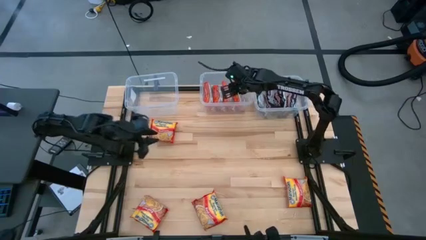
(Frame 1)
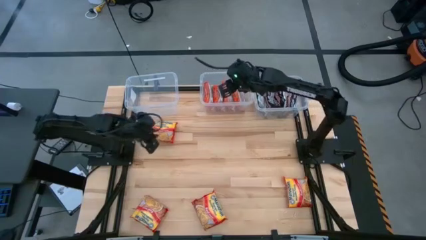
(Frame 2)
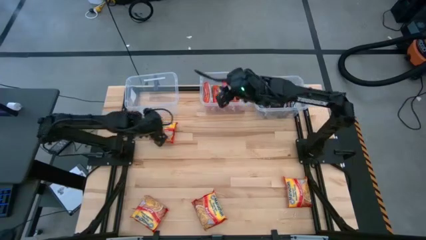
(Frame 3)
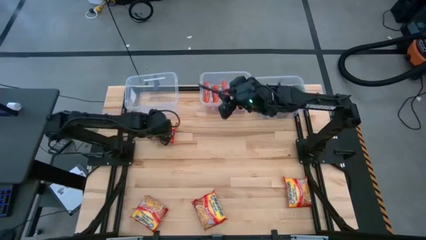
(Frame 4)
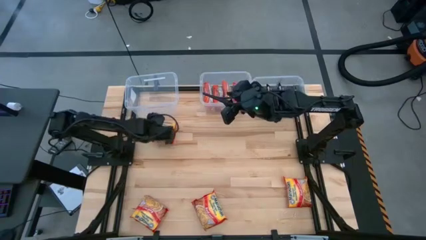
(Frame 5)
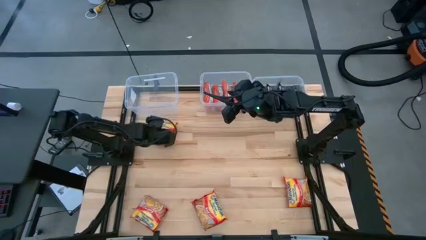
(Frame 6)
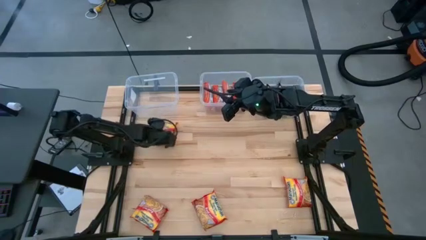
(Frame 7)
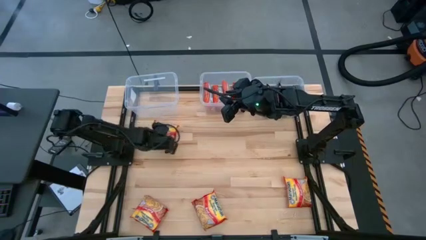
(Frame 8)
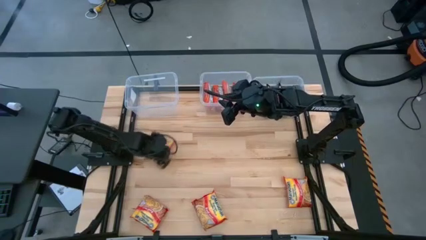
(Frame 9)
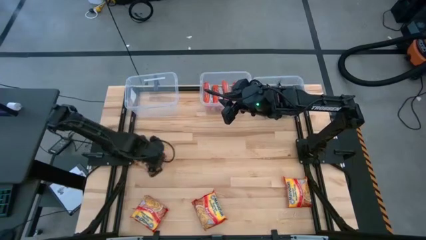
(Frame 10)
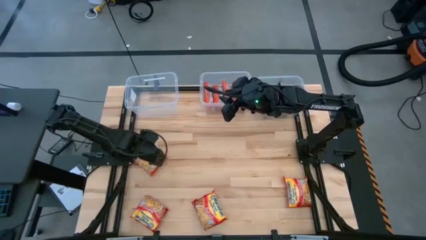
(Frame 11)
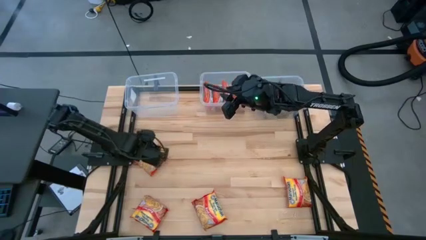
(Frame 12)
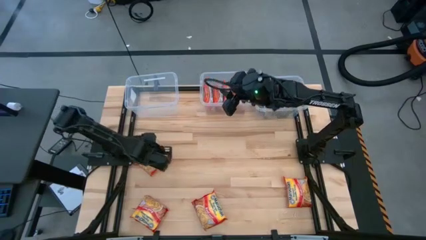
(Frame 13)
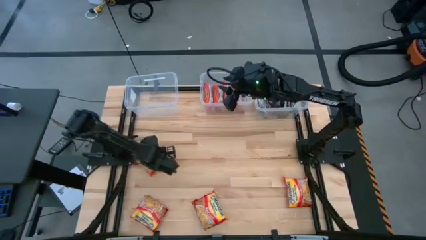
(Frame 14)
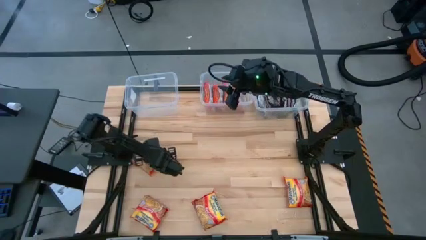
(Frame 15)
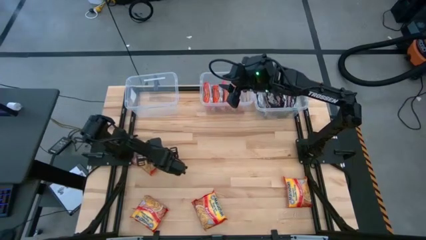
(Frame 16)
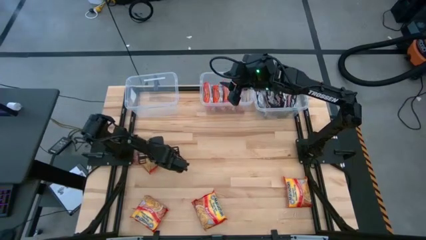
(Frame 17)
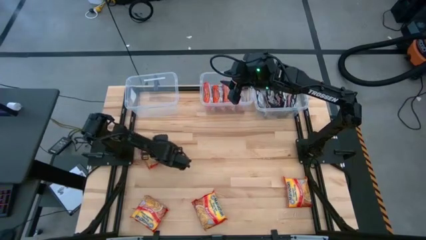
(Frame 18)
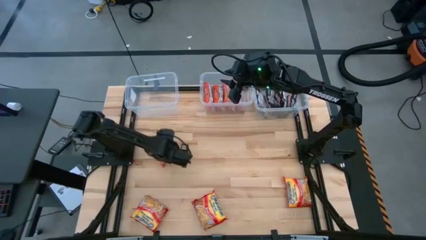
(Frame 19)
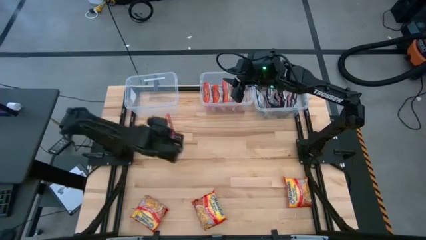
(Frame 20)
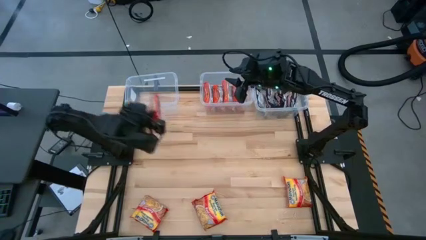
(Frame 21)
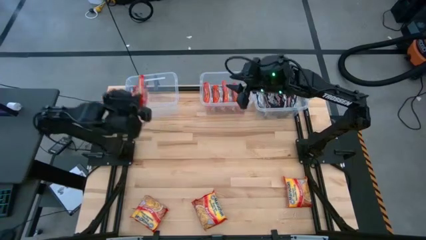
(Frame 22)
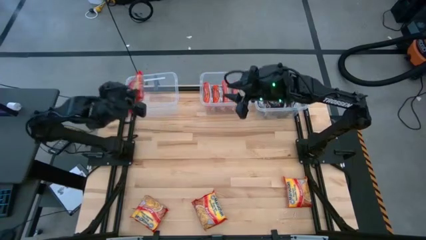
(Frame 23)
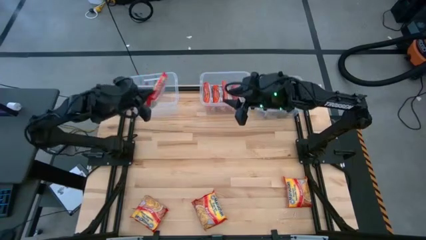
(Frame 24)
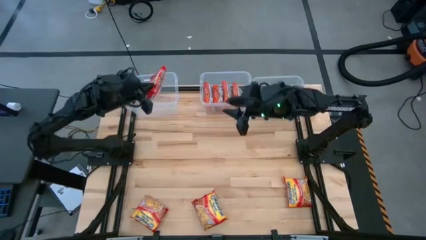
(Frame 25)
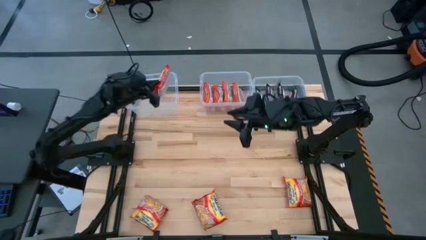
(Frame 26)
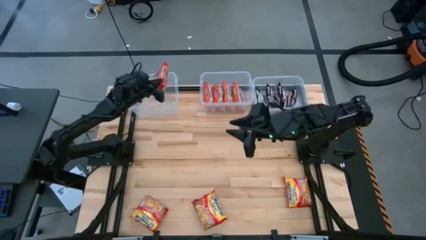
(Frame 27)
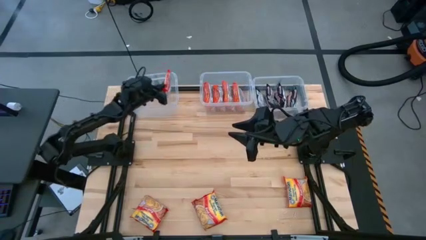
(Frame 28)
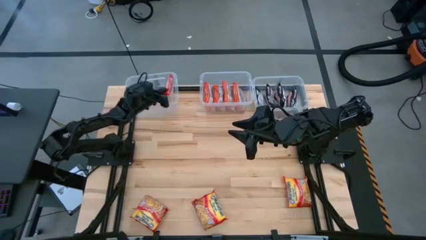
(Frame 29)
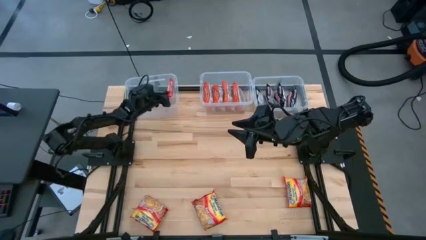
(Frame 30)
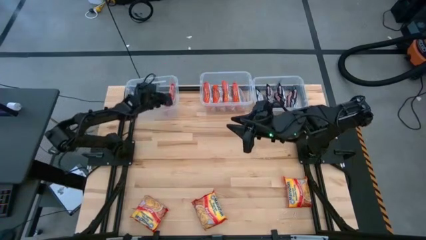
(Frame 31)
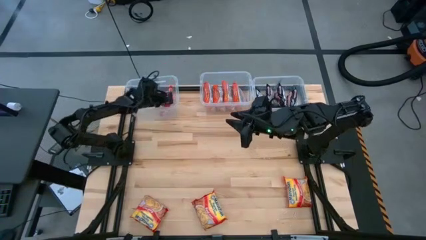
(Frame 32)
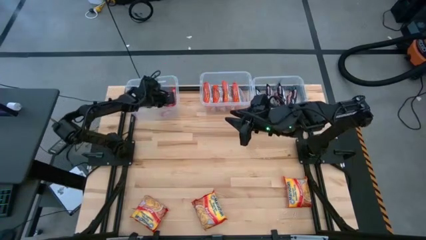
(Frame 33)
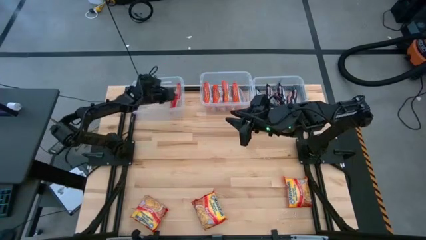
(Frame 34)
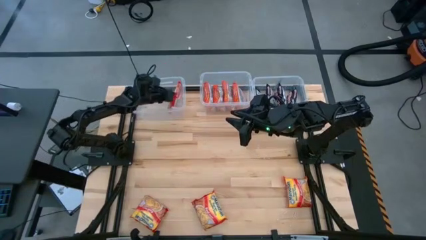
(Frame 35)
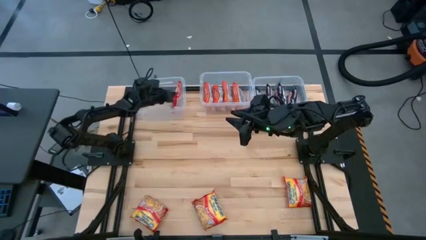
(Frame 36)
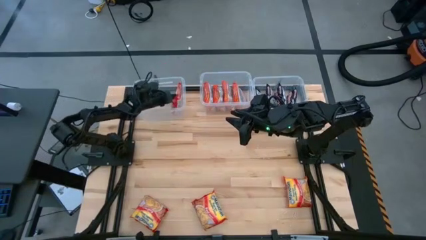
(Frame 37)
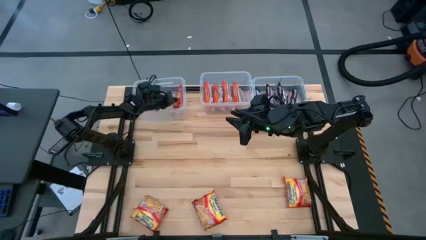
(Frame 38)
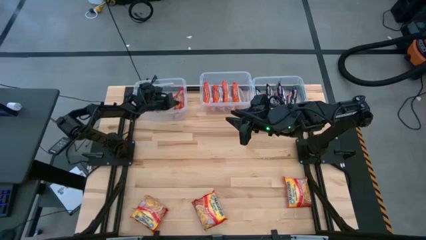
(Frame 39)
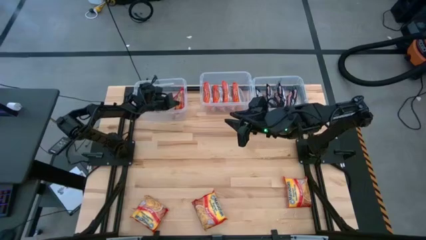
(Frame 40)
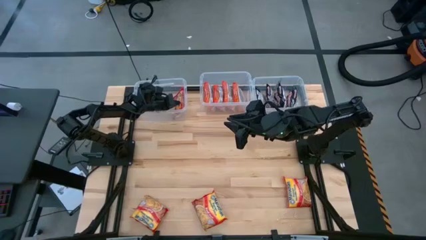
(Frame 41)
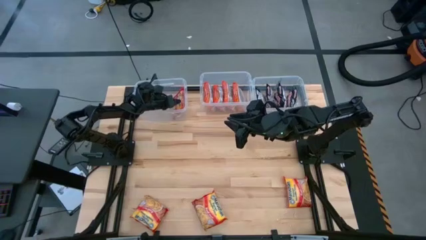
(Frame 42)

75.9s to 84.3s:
Task: Sort Maruchan noodles
Put the red noodle pack into the top left transparent bin

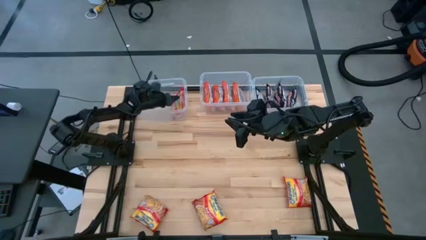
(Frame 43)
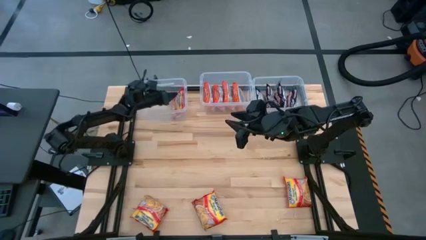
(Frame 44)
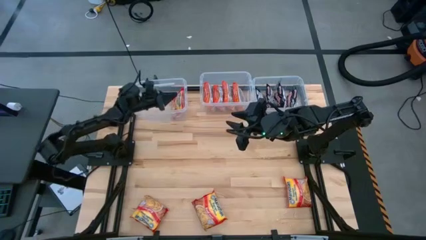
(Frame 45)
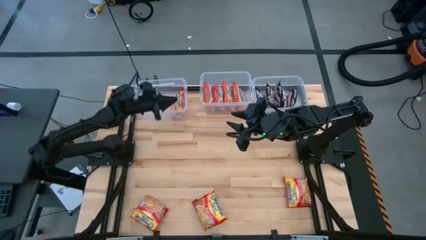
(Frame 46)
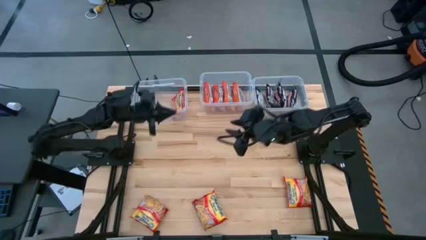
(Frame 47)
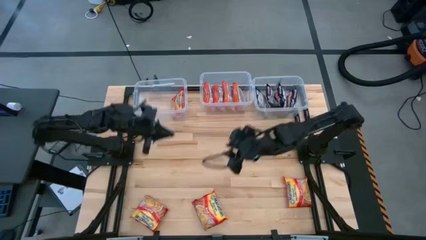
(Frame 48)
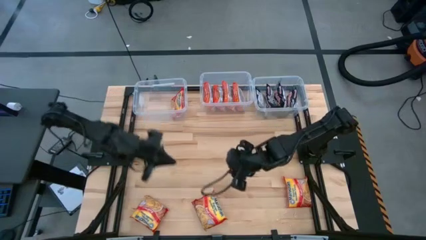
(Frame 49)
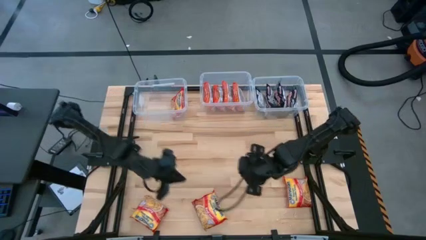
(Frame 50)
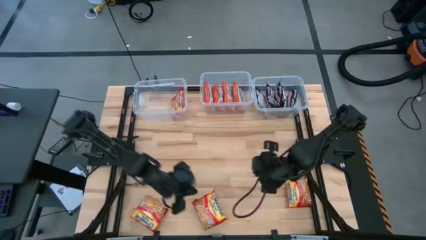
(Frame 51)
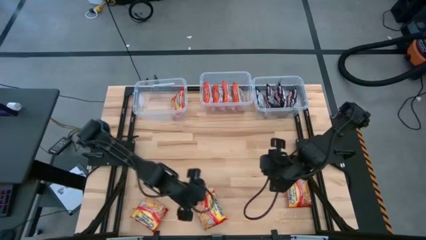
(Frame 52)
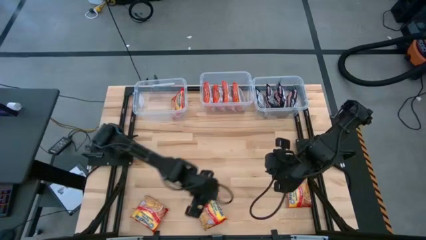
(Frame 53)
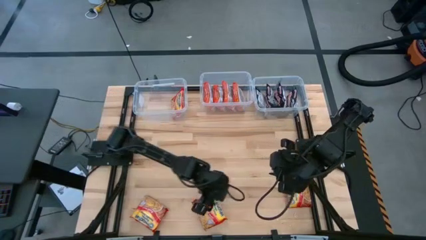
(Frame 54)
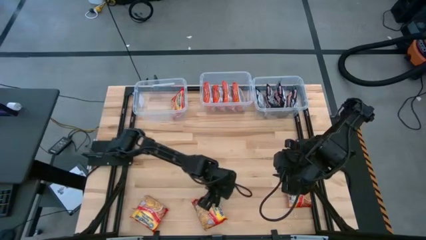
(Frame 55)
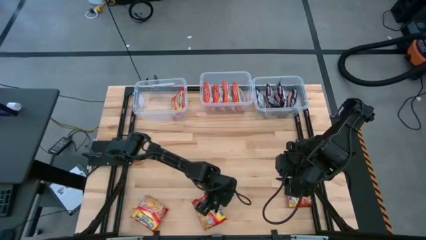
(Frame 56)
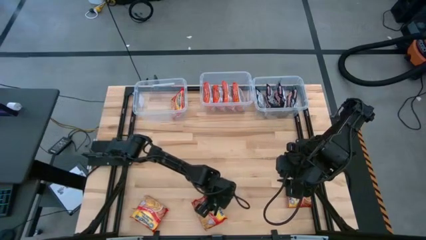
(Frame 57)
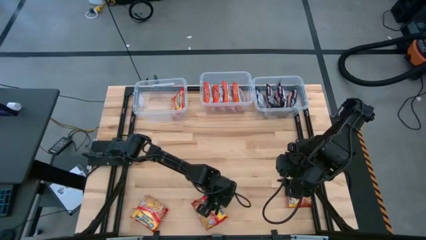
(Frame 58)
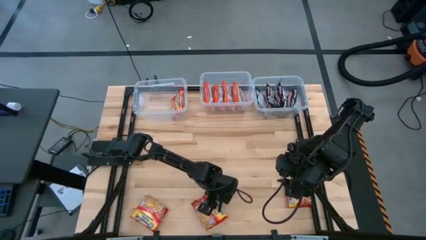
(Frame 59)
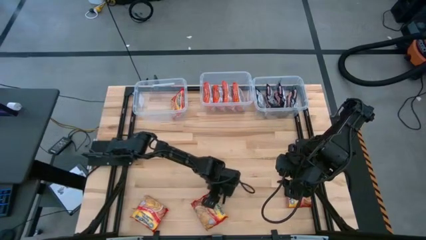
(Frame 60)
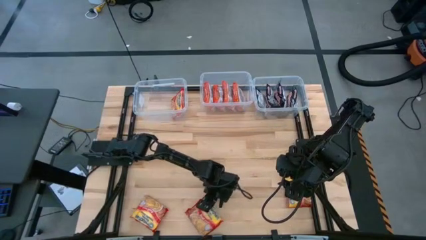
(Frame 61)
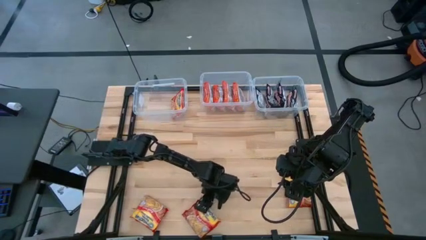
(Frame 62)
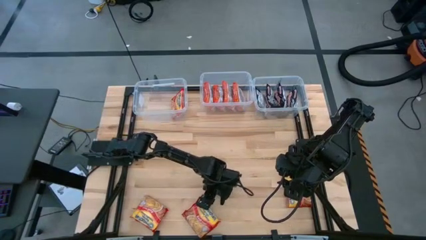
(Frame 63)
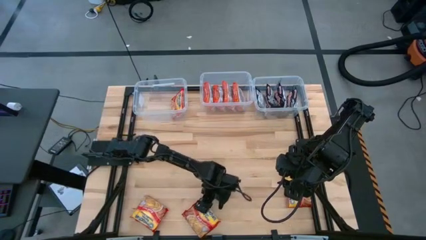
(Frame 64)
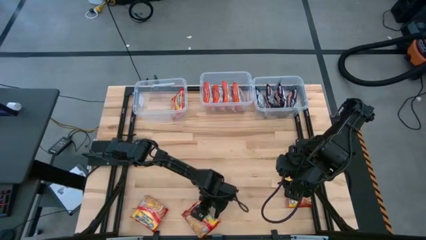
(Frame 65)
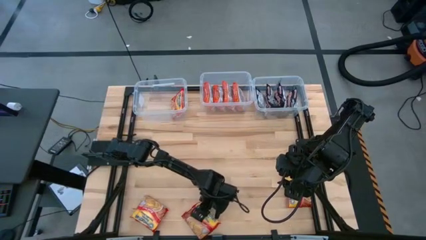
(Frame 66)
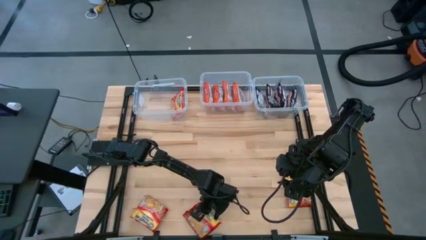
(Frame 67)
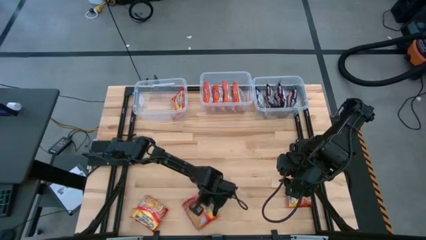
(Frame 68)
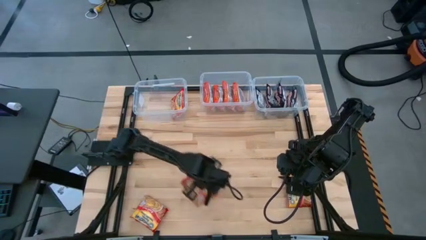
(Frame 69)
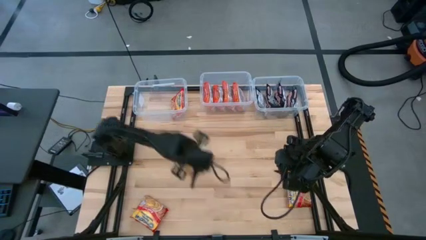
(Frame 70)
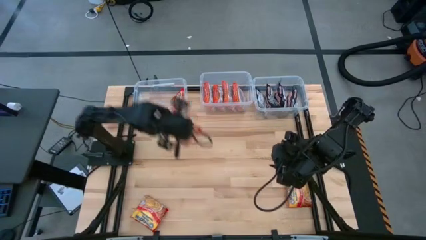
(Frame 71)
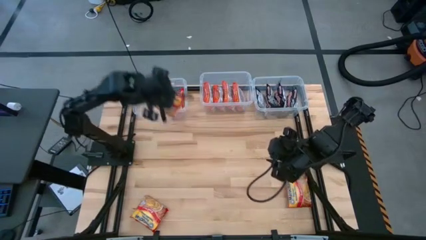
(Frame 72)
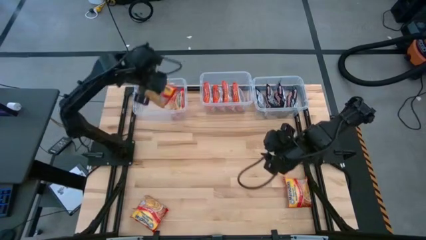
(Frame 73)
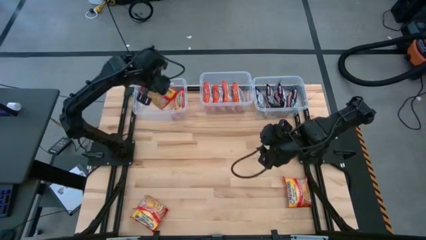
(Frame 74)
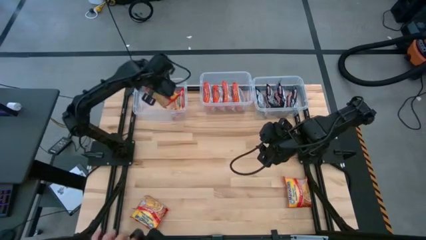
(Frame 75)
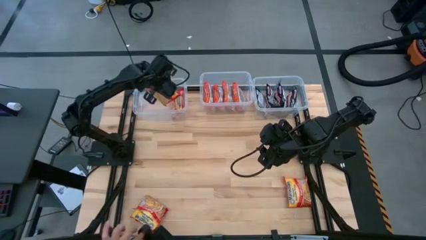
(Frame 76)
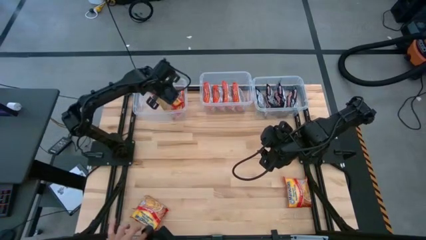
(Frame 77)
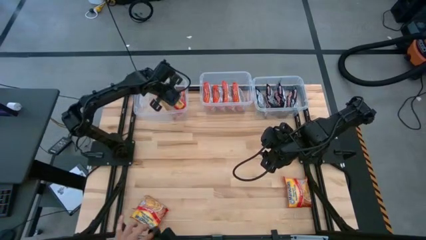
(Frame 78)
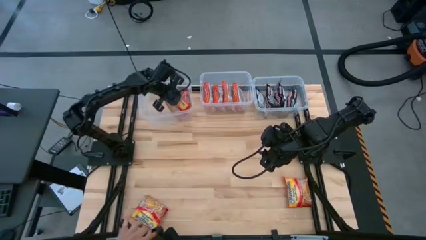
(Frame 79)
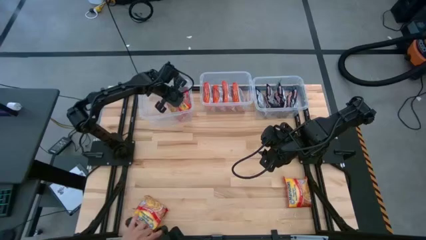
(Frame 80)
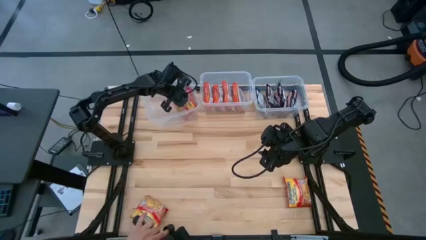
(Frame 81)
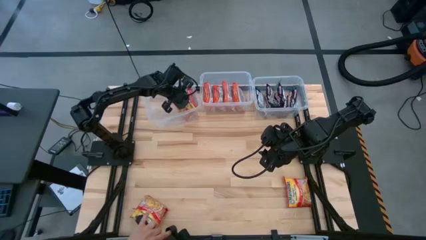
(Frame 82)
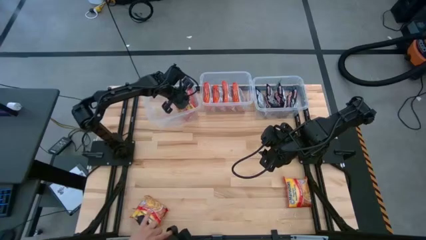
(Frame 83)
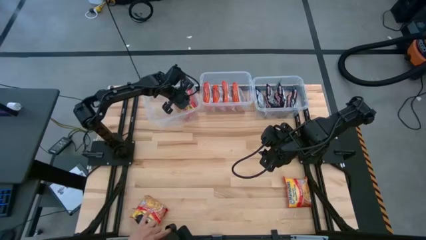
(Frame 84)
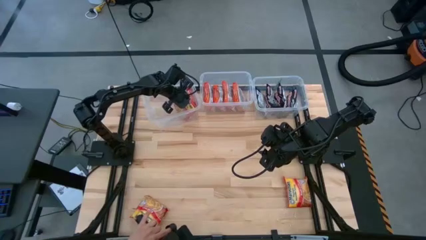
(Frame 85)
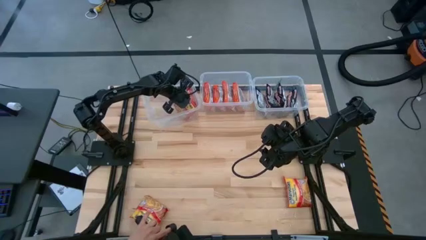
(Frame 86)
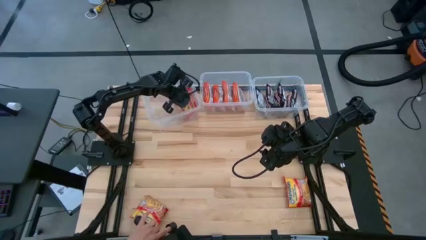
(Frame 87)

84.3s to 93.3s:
Put the red noodle pack into the top left transparent bin
